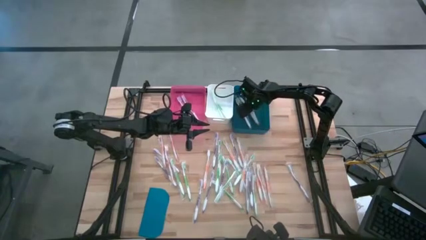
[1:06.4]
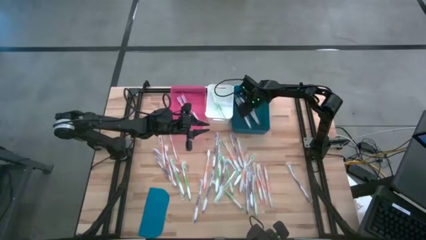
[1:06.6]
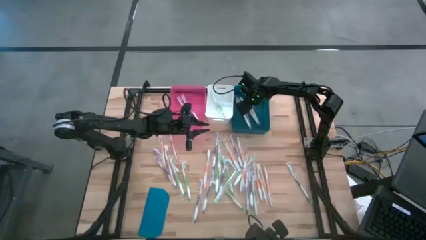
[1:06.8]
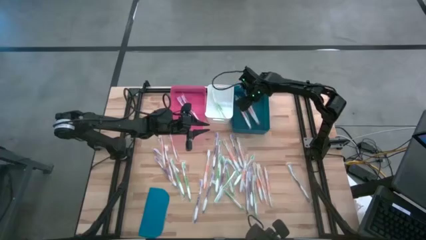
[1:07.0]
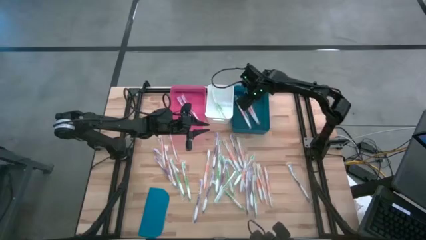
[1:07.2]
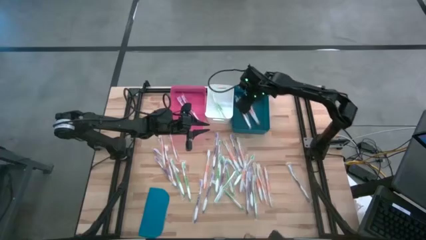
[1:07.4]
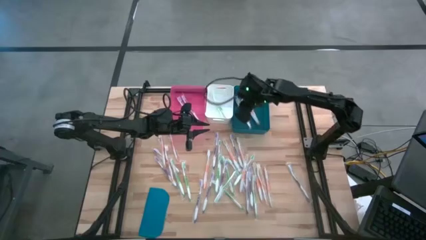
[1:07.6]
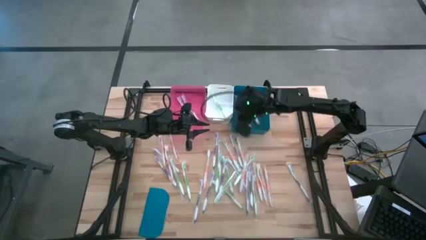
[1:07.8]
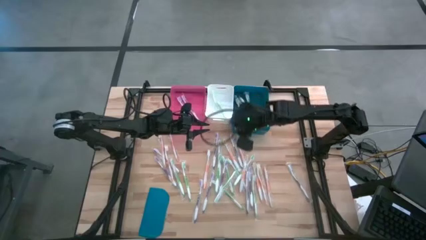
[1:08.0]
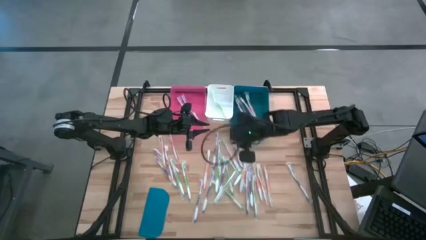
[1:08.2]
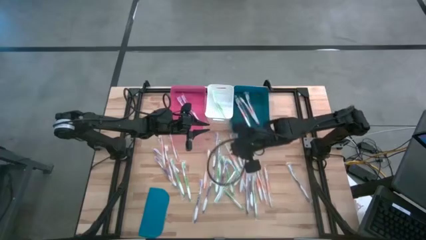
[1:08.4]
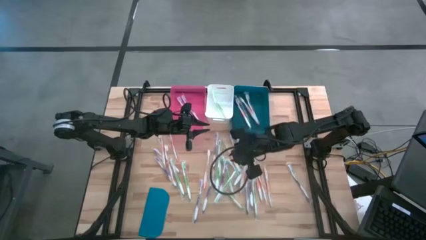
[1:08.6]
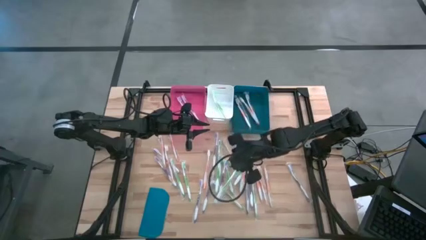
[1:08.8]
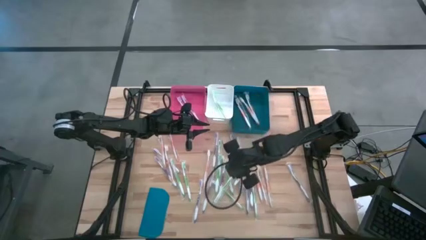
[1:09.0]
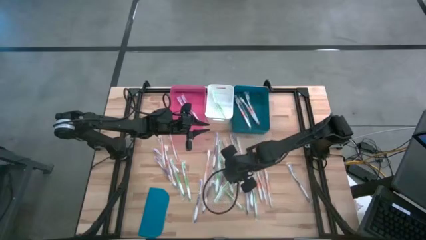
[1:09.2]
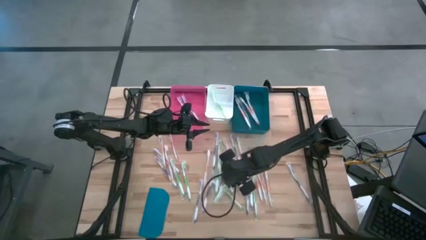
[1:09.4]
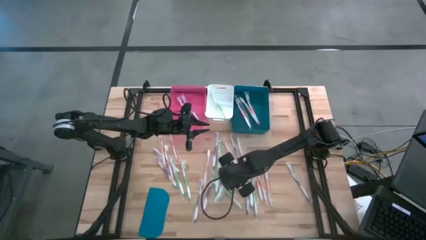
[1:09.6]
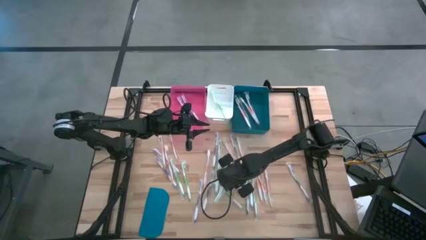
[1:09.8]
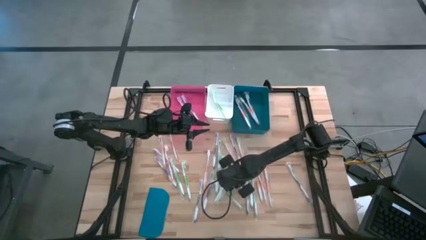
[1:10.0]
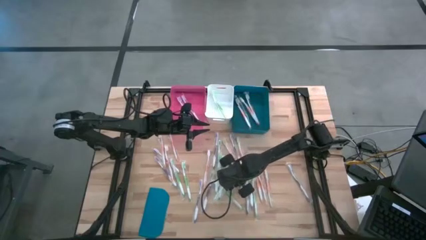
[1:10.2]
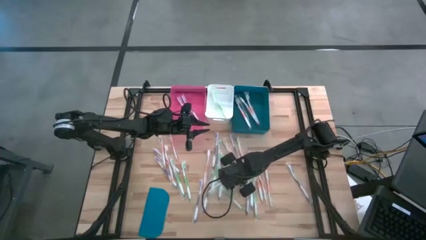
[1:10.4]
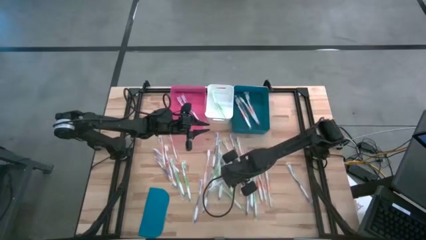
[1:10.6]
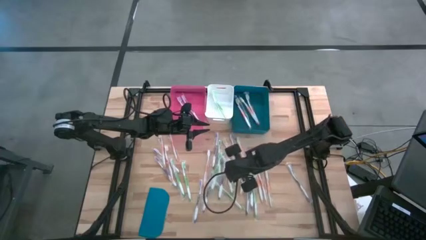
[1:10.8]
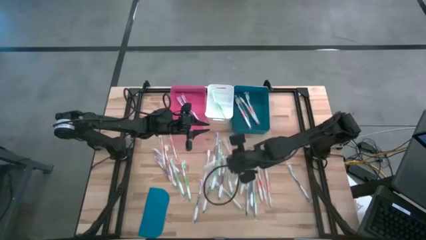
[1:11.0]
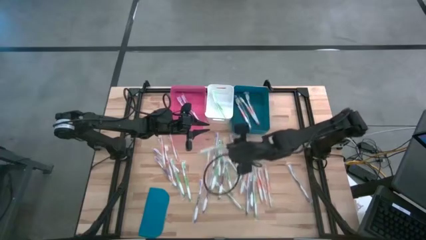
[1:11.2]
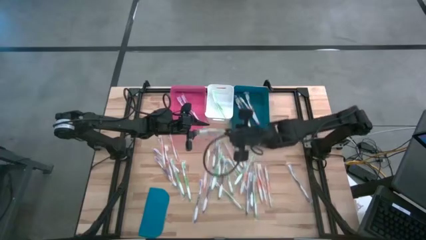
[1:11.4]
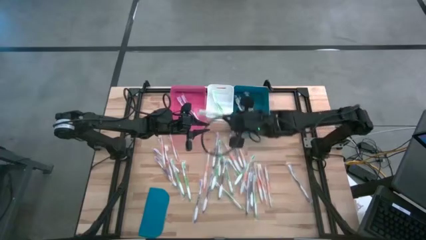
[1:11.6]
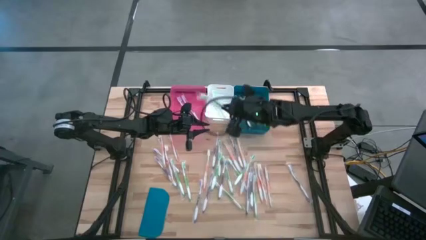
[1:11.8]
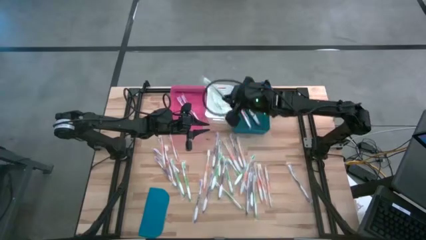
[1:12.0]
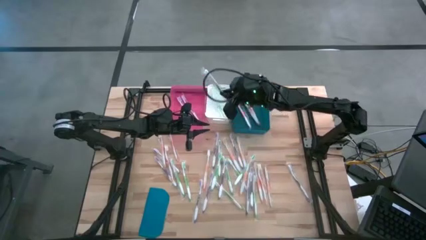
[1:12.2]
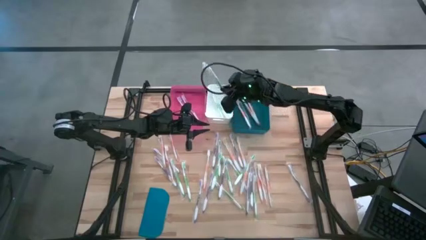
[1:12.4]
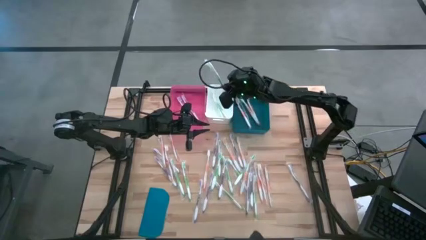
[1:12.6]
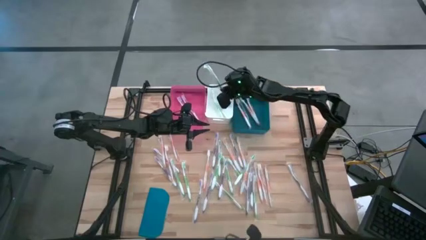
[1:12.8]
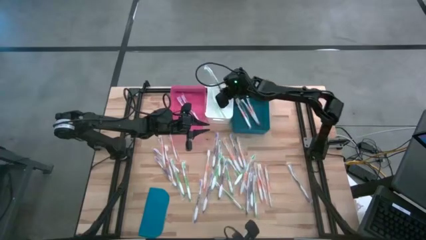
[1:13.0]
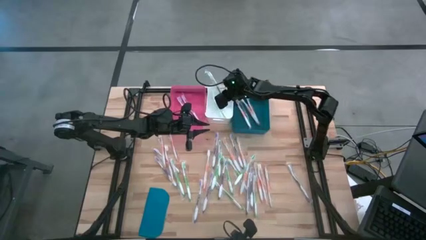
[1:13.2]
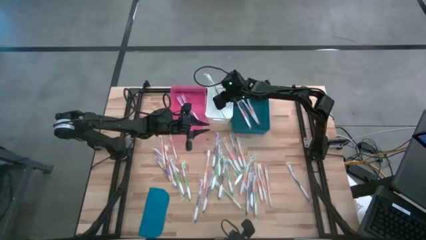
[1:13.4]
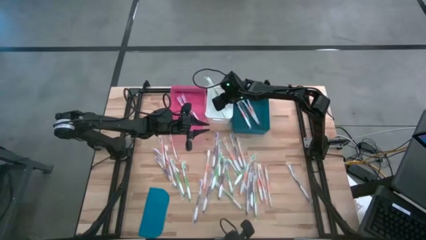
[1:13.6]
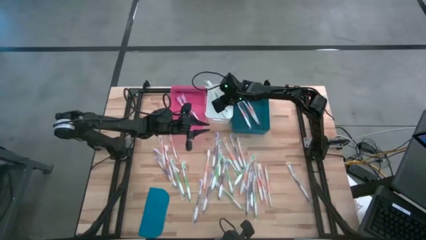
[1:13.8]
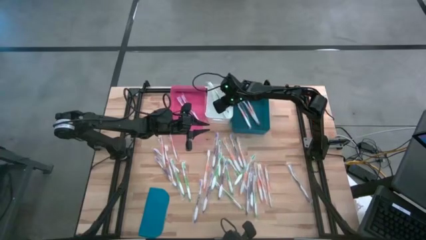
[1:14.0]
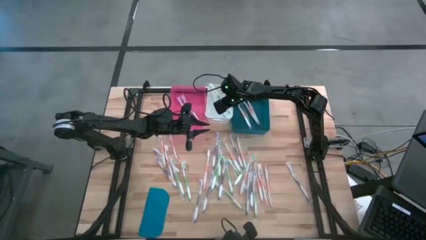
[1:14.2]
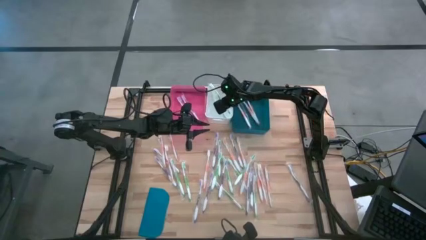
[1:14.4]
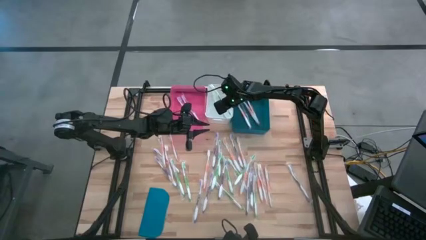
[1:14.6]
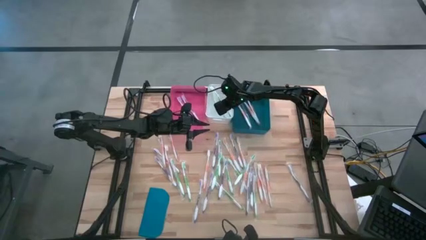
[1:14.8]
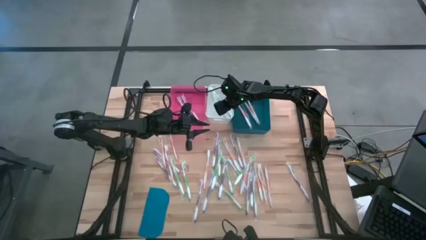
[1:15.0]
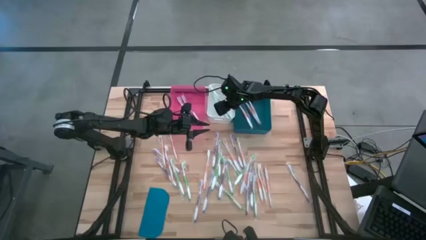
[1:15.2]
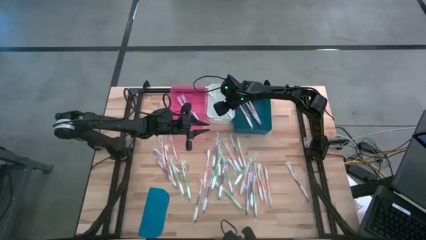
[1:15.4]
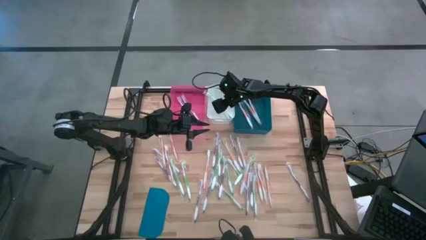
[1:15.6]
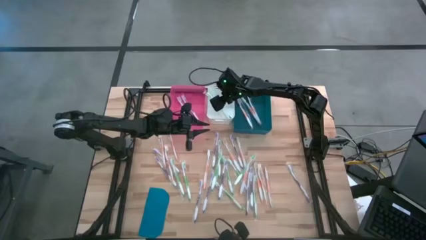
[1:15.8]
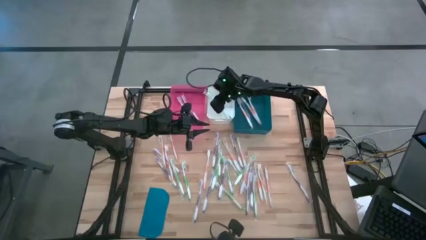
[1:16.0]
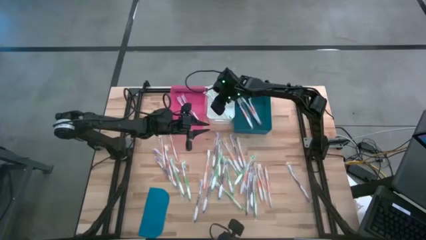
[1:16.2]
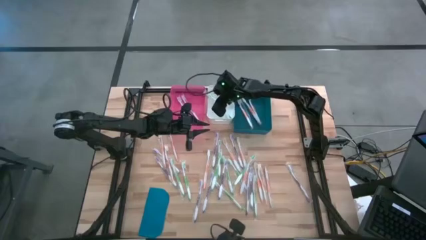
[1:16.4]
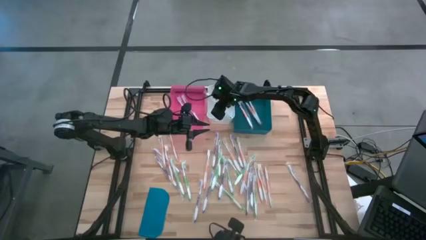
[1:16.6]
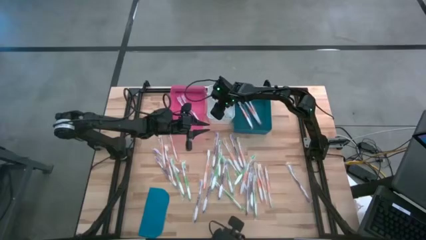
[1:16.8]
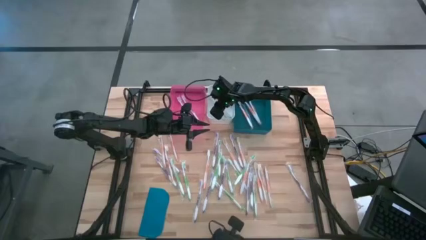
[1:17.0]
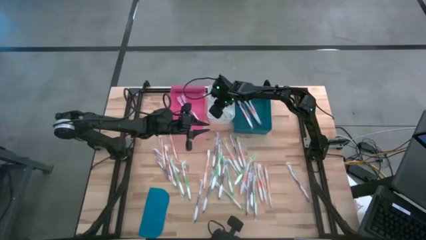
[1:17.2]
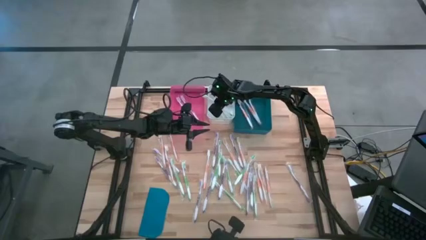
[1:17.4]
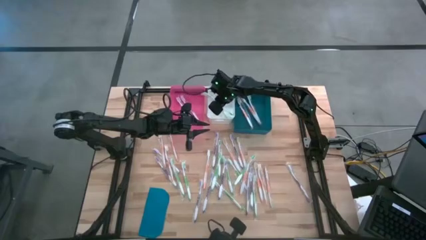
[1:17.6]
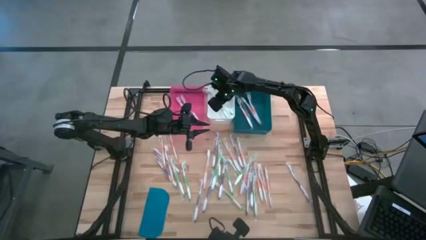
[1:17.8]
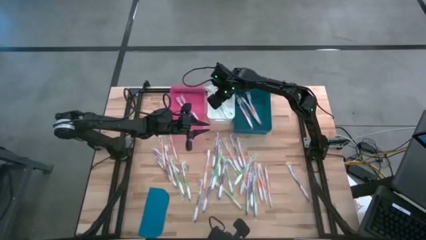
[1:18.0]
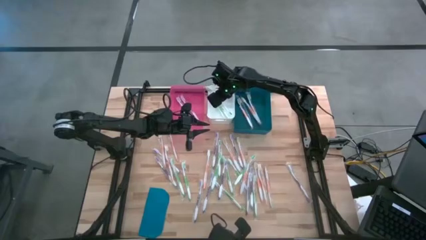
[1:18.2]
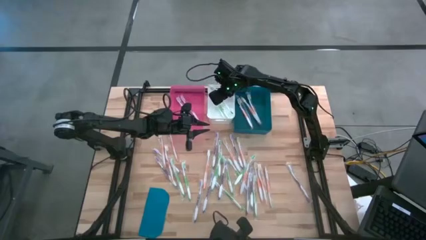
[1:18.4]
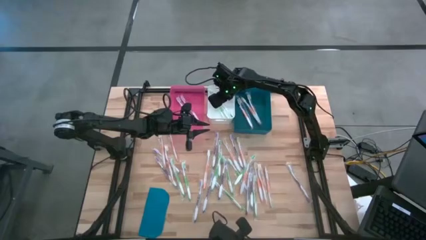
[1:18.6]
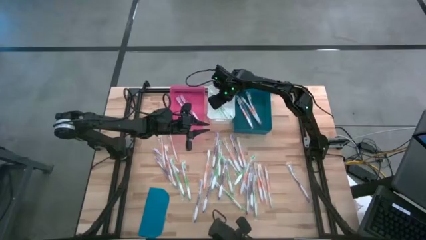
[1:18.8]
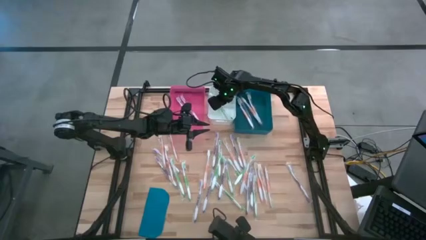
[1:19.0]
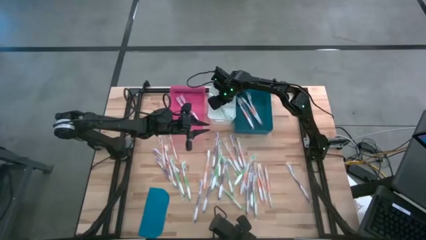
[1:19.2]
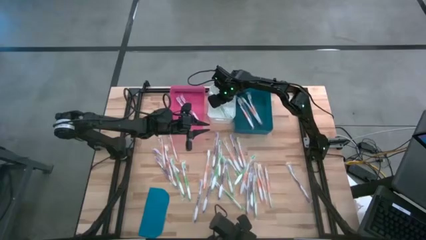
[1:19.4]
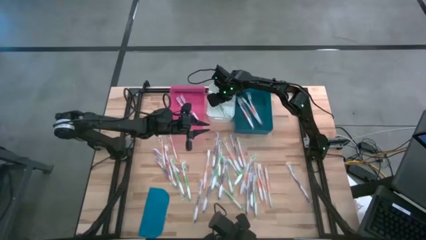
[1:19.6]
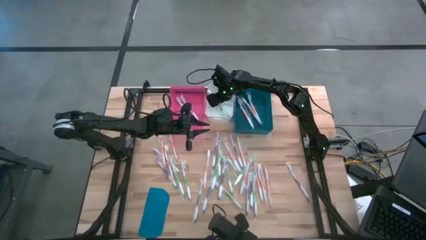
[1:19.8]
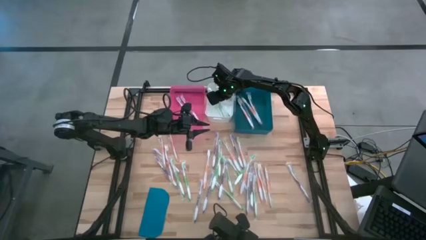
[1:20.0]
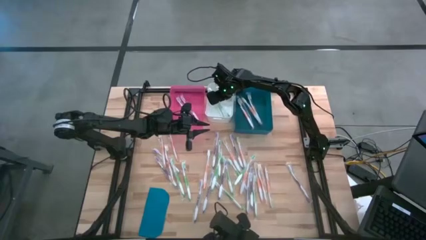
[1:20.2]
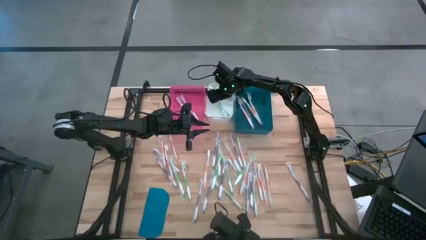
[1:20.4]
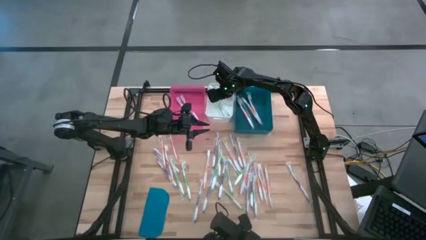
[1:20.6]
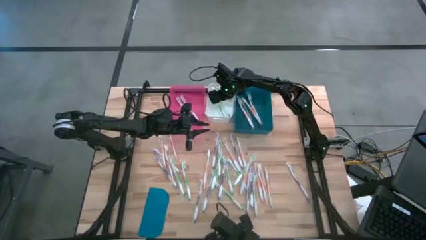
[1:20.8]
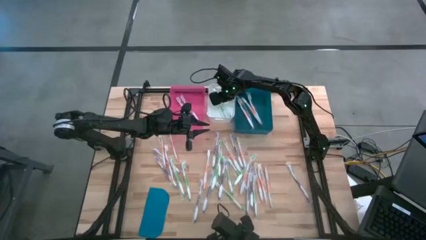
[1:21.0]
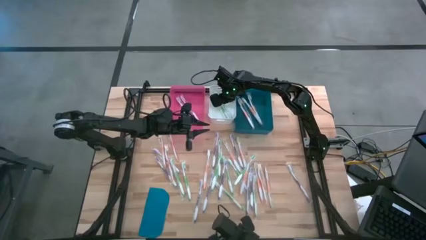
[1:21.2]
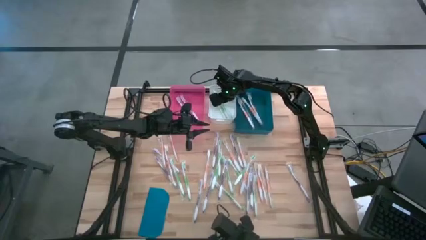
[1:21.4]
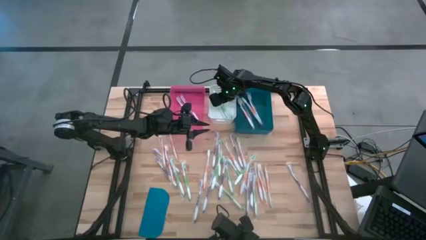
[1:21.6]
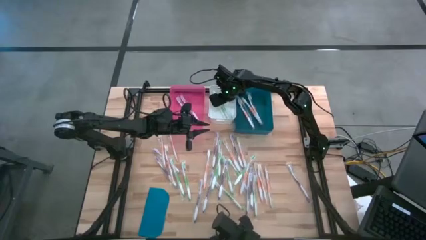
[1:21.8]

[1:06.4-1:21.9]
Task: Pick & Place Toothbrushes
Put the green toothbrush into the white bin

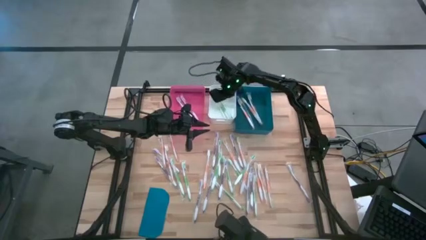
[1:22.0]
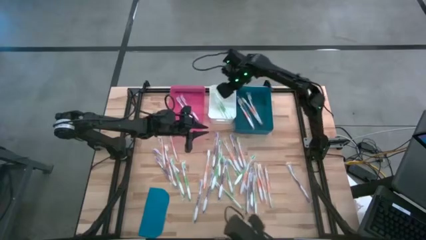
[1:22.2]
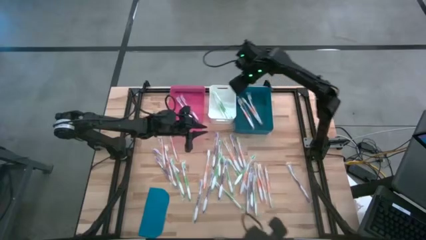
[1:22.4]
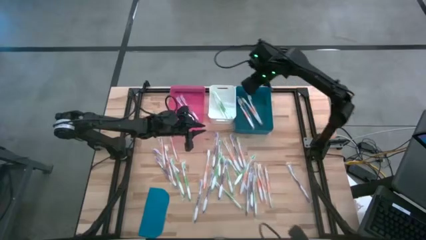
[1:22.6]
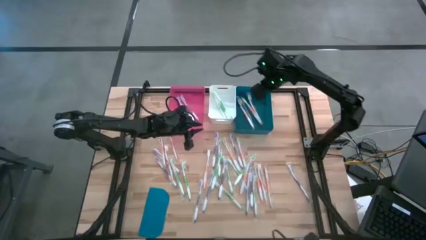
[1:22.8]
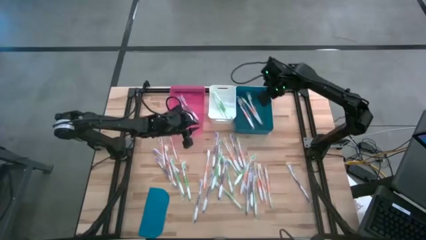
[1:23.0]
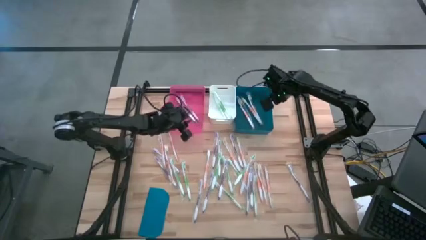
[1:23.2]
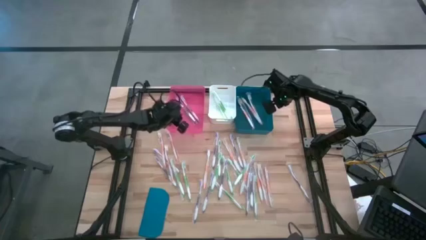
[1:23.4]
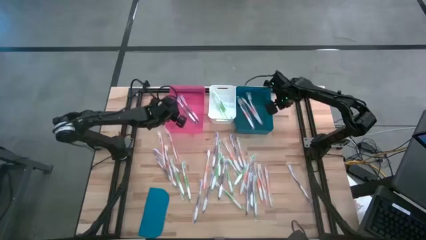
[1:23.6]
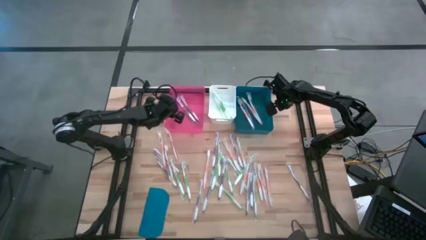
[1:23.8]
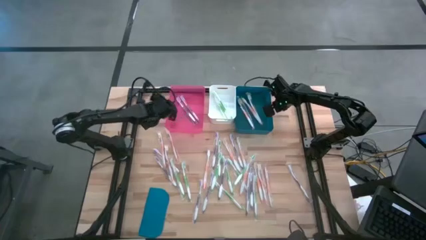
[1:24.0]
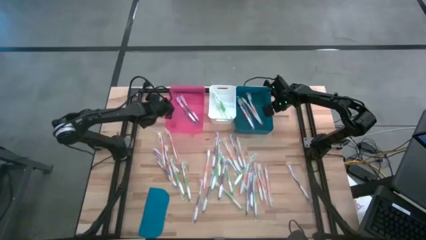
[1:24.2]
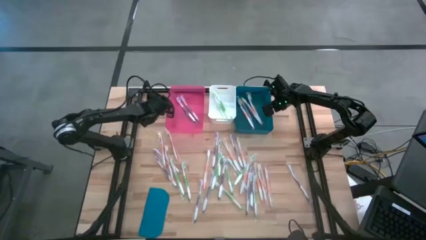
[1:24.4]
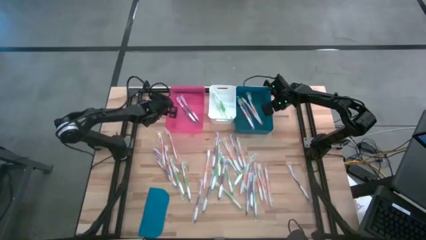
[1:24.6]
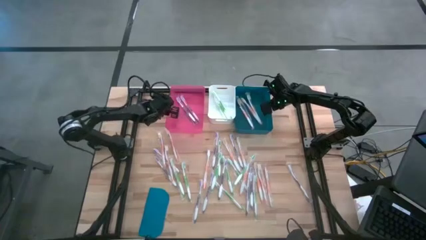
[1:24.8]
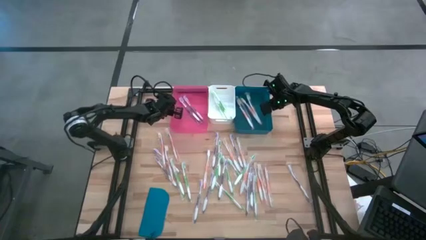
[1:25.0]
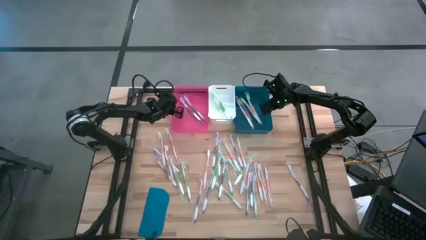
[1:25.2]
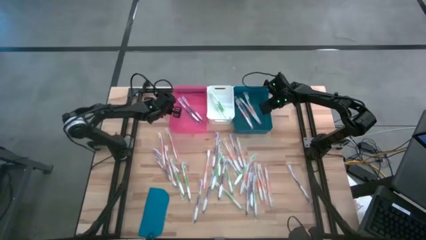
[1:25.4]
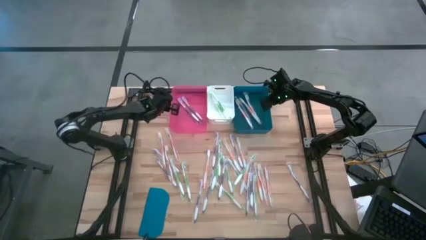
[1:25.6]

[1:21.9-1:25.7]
Adjust the bins on the table
